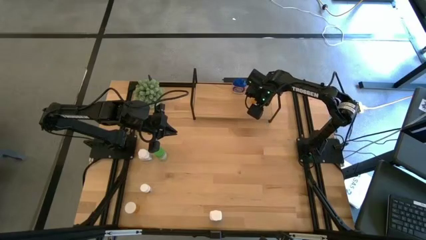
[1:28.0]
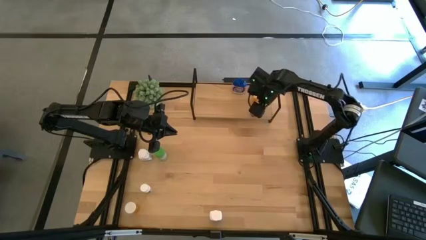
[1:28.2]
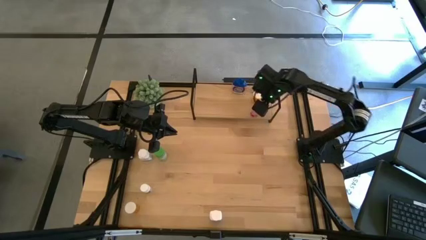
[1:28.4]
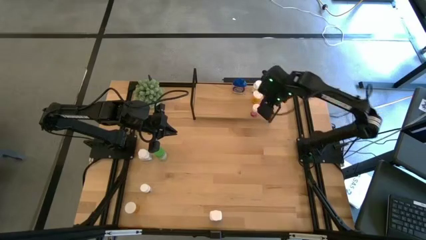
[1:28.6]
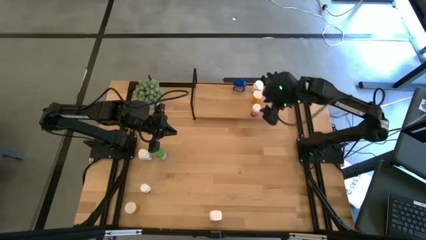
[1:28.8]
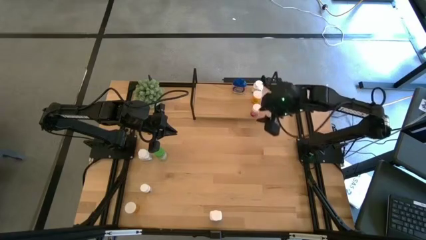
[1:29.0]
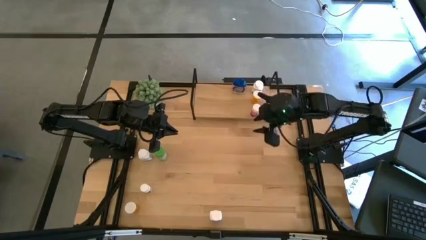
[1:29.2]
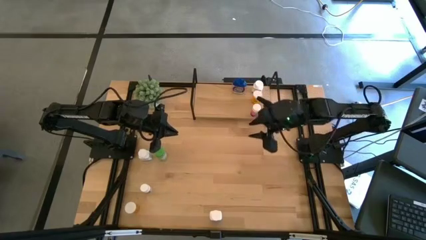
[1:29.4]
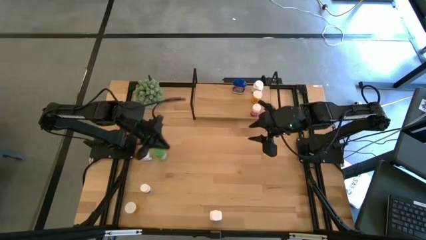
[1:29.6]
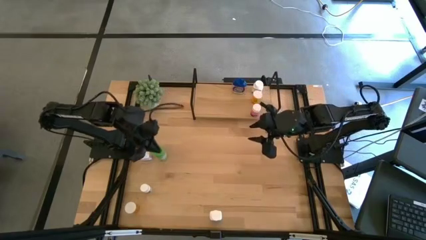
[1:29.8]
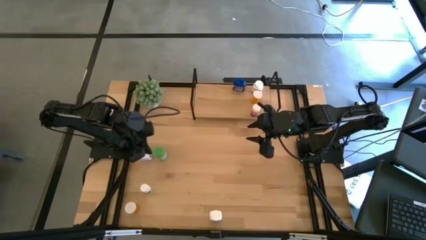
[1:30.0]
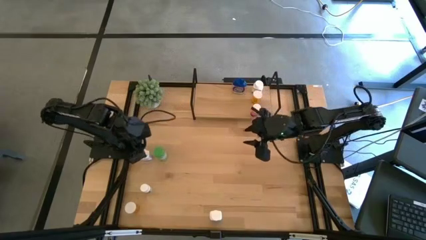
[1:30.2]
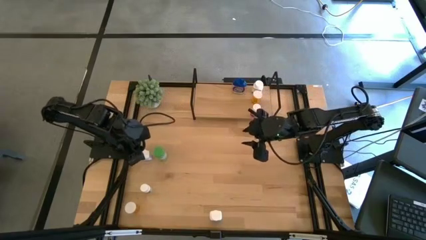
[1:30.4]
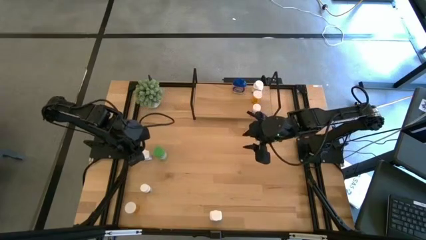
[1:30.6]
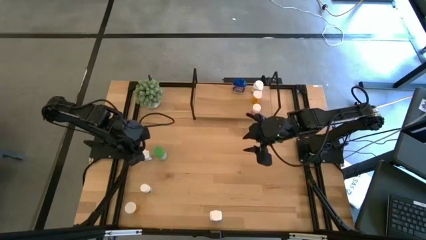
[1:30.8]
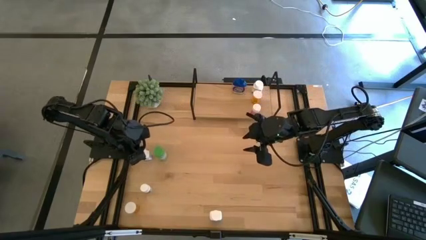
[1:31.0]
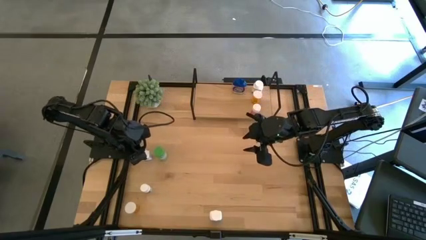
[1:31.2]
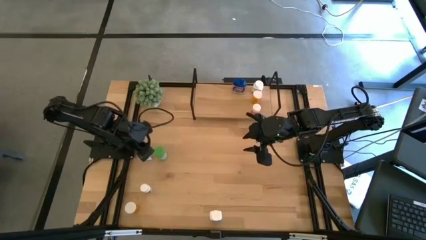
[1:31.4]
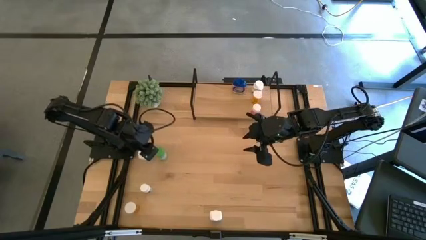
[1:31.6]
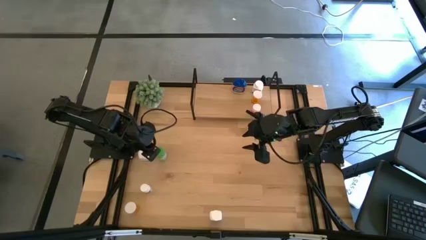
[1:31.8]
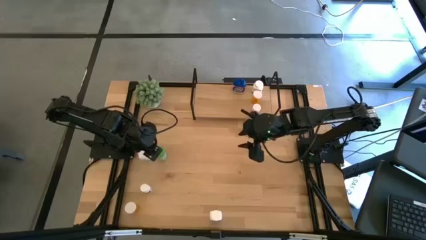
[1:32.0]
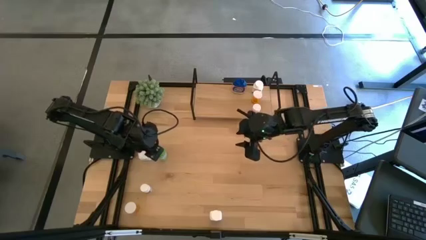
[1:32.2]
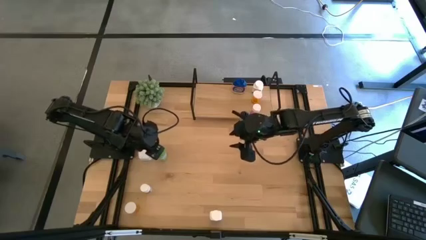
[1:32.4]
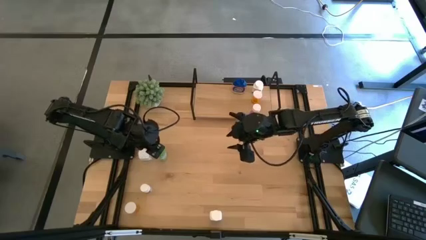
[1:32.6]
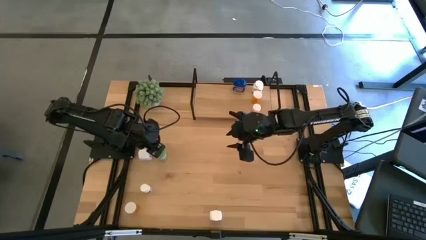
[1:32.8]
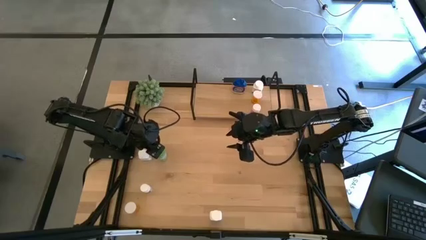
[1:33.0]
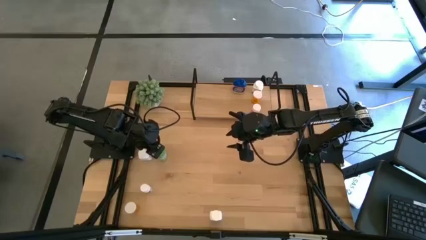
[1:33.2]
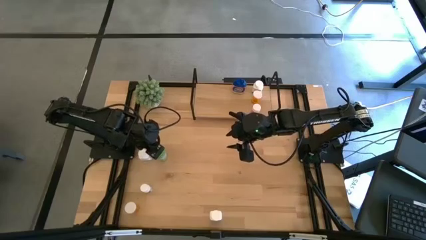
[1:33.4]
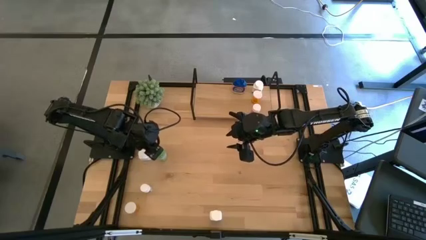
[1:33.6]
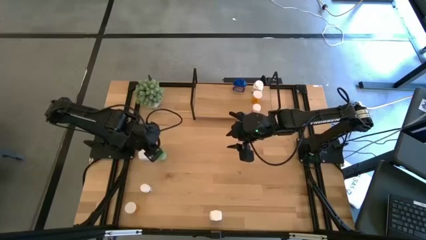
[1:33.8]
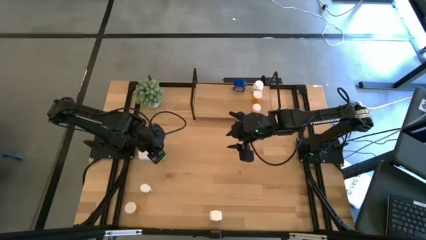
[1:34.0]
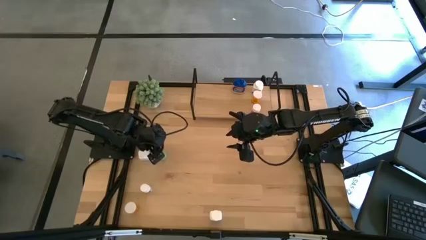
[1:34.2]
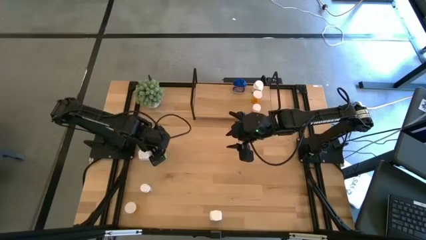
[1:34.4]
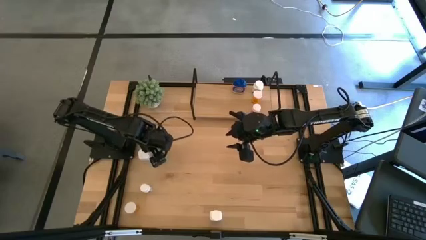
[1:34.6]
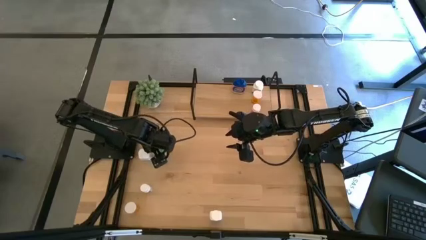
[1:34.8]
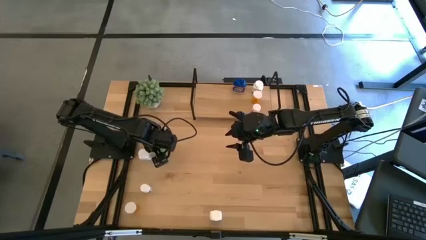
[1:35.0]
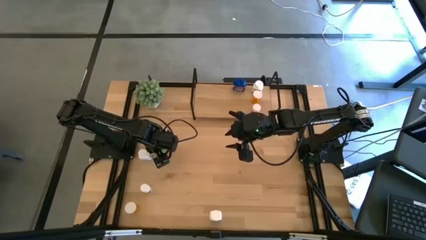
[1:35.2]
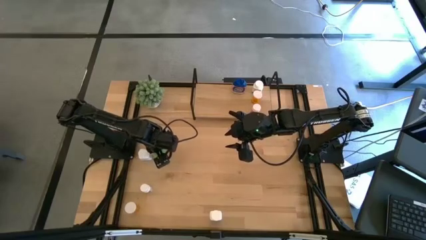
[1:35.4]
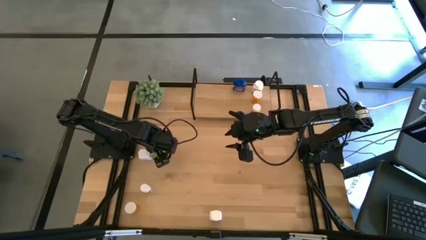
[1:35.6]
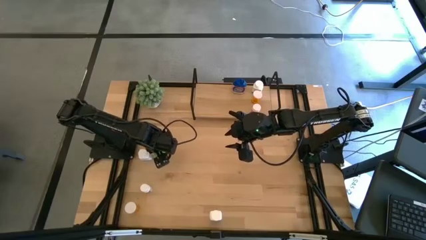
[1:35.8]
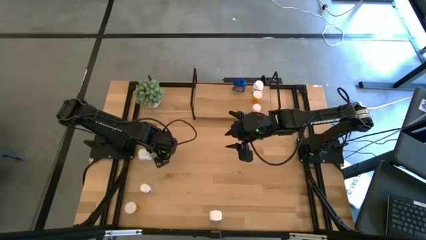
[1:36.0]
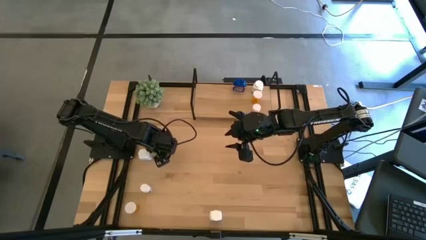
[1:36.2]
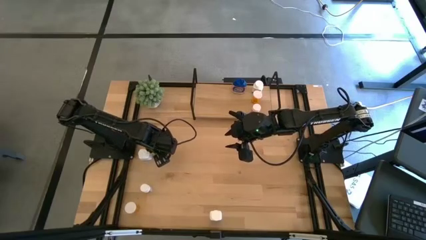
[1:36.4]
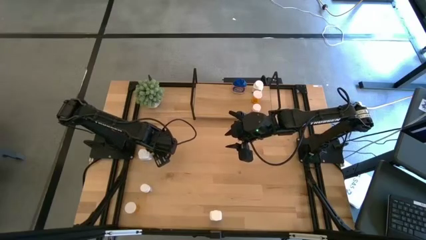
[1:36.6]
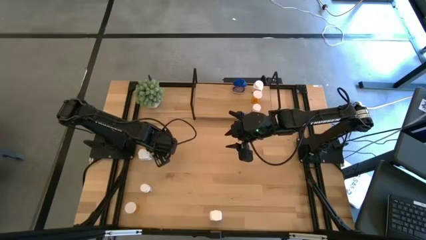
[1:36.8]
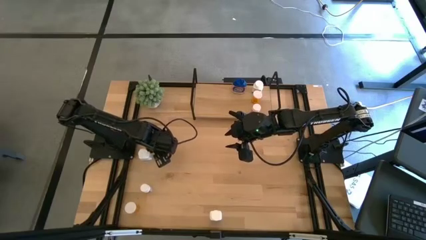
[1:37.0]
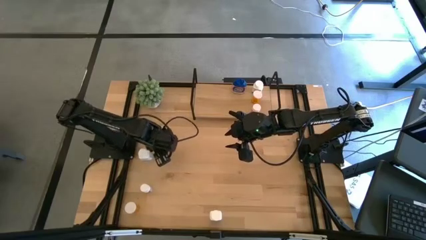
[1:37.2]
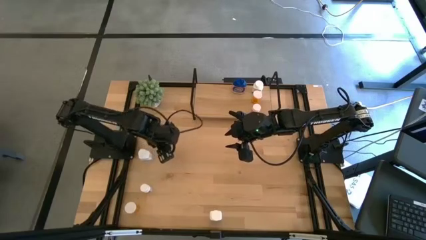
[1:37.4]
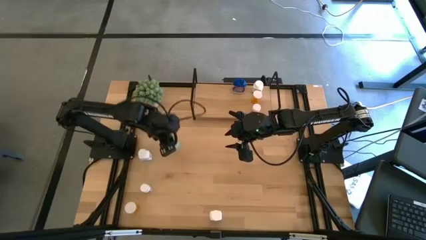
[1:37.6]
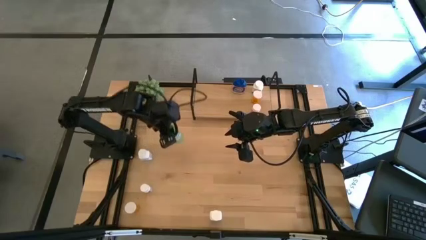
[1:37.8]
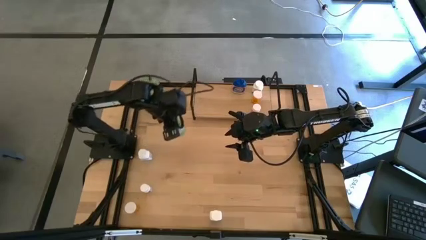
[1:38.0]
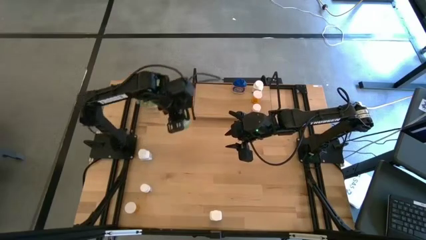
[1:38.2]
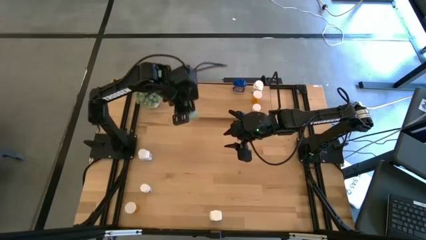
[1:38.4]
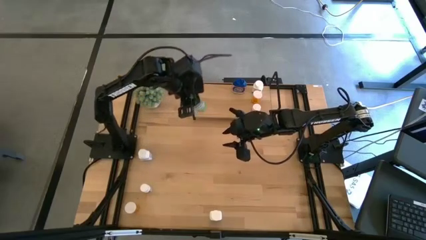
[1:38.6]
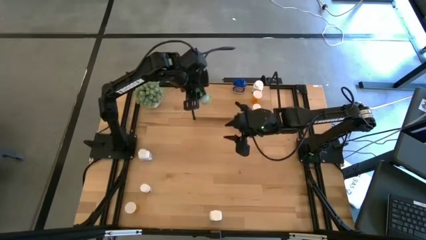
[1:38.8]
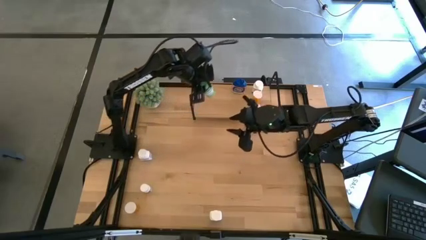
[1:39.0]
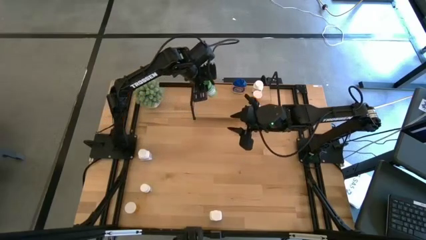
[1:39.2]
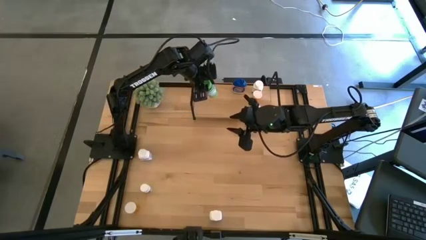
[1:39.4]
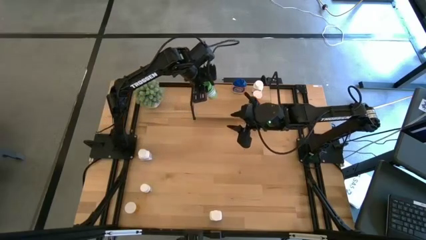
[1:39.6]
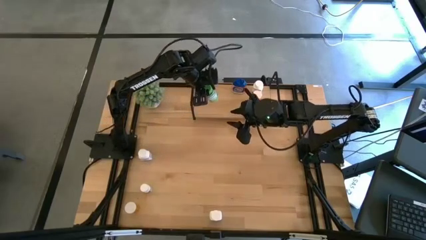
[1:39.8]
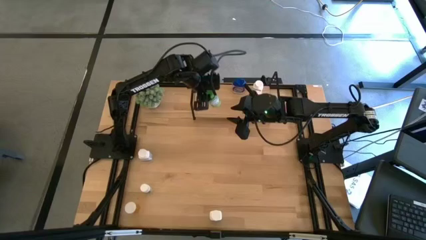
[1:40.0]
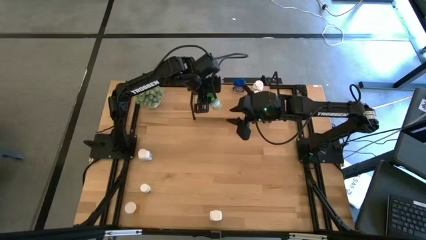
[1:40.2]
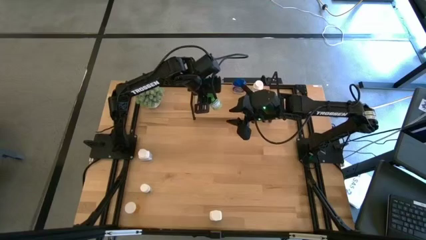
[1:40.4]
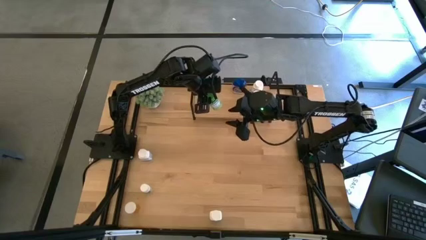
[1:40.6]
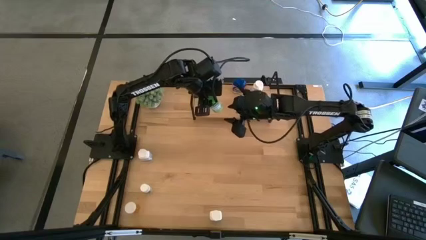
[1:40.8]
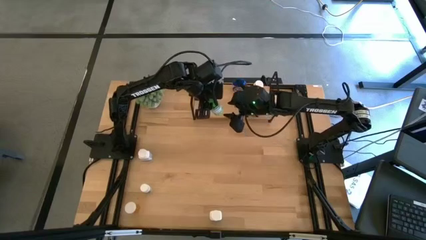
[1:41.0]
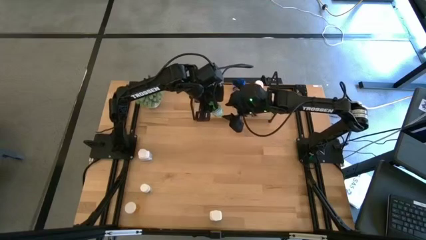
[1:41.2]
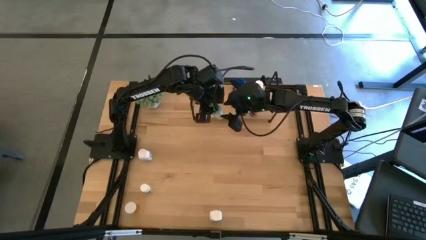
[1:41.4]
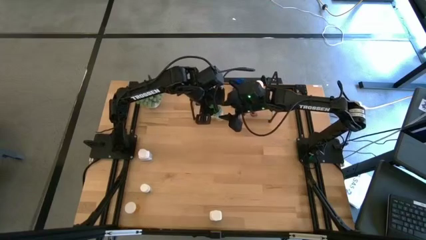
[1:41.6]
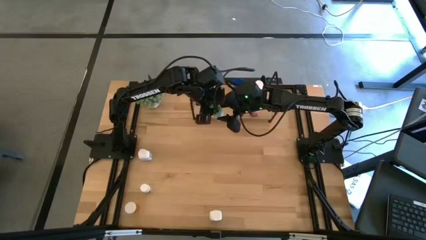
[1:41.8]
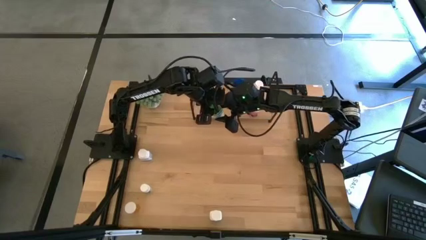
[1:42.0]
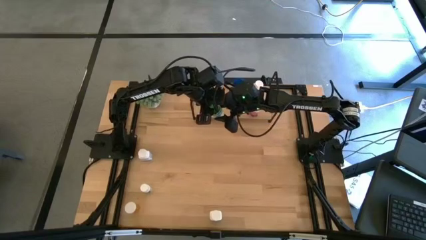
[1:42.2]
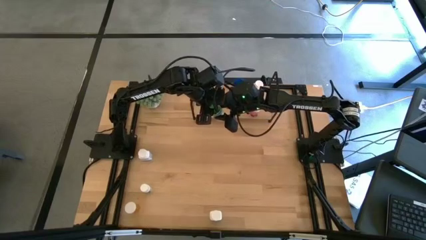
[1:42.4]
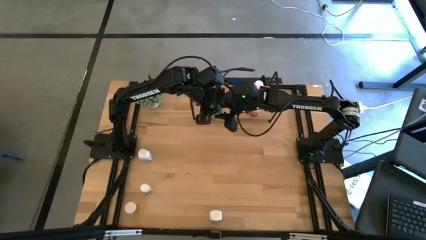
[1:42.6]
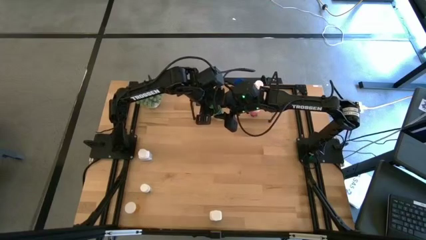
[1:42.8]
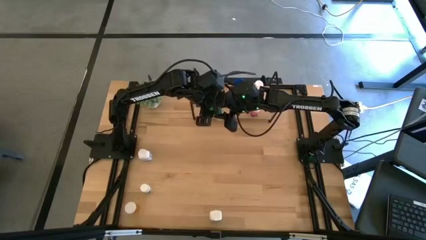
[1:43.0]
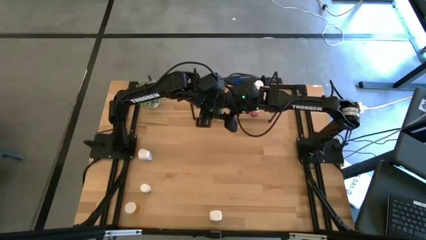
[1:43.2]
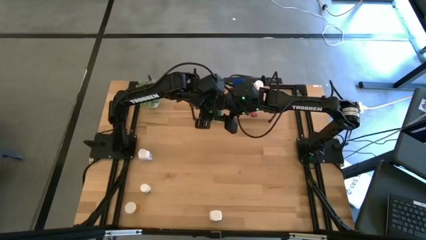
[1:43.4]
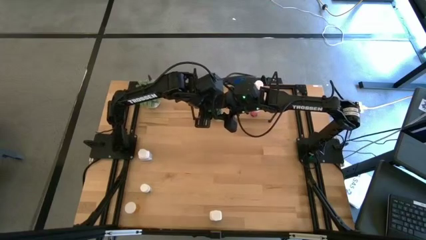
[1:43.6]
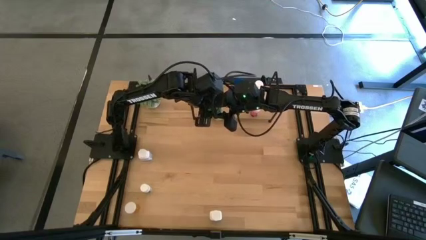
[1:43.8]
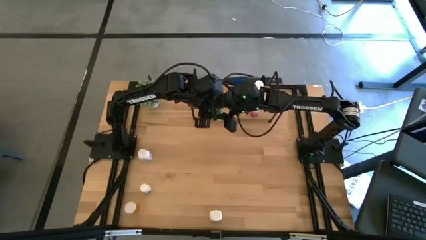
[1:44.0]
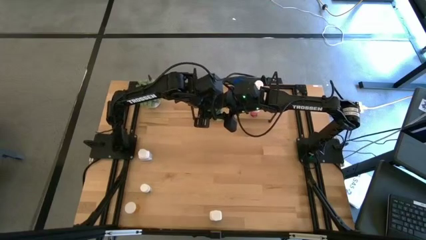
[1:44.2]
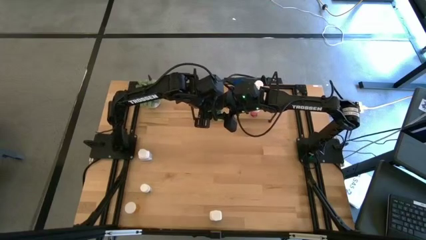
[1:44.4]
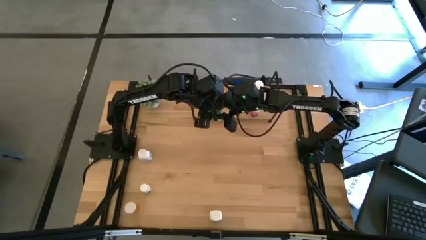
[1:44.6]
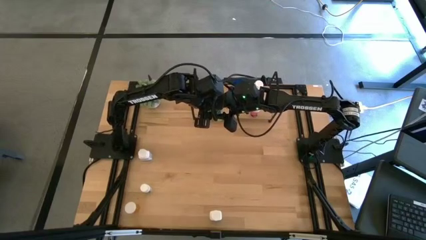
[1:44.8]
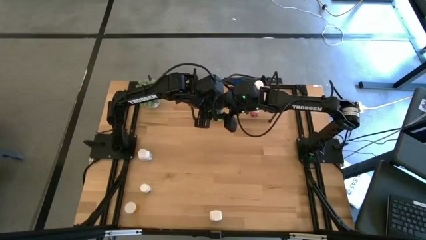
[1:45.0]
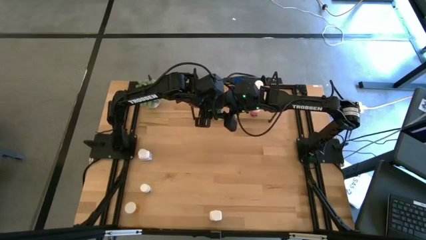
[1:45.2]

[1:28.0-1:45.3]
Task: Pick and place medicine bottles onto shelf by color
Put the green medicine on the shelf
